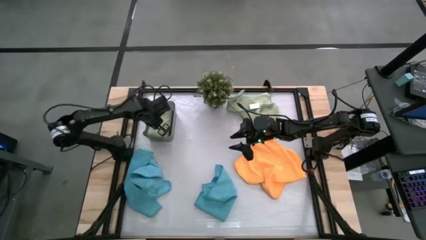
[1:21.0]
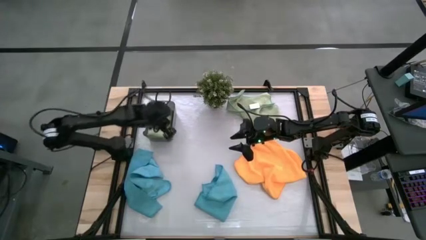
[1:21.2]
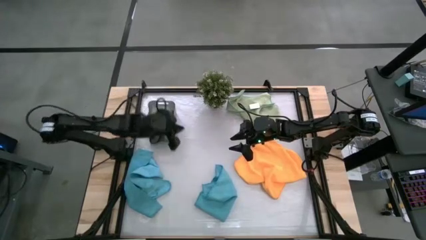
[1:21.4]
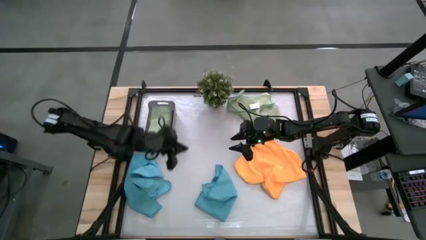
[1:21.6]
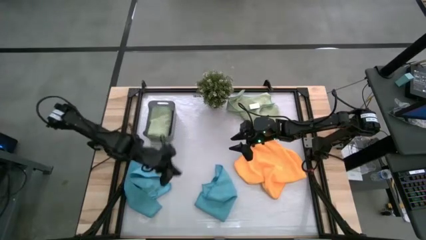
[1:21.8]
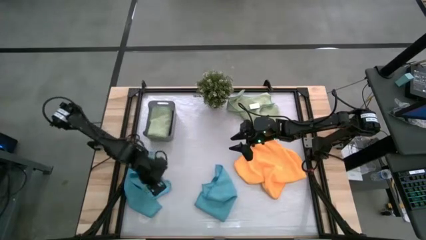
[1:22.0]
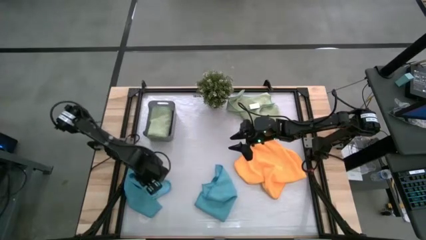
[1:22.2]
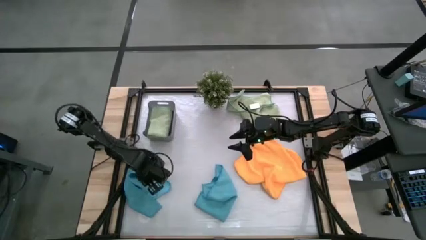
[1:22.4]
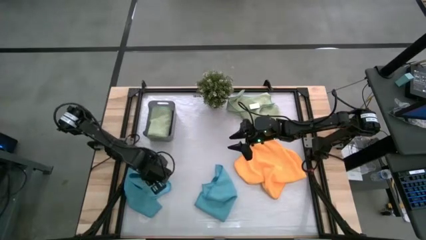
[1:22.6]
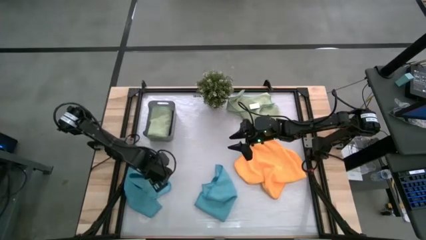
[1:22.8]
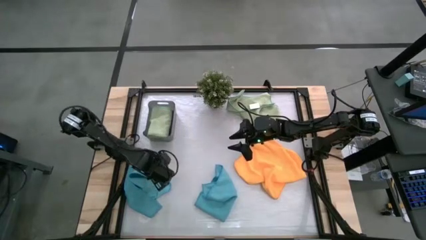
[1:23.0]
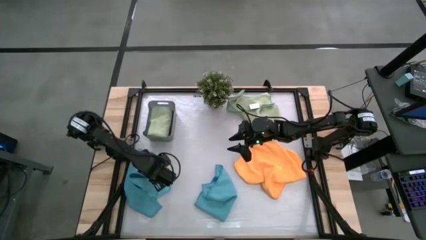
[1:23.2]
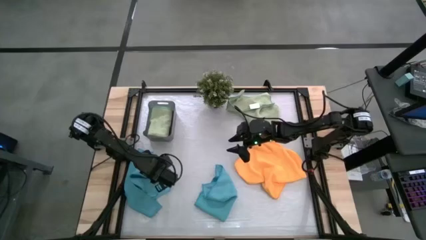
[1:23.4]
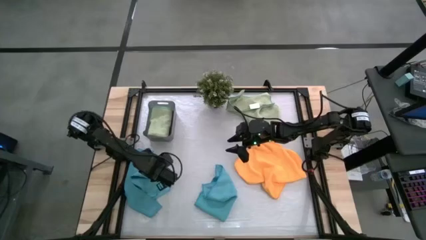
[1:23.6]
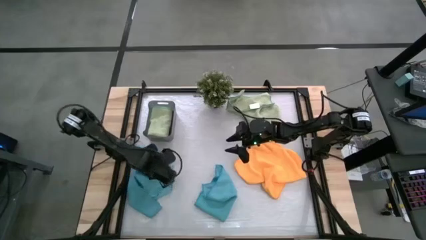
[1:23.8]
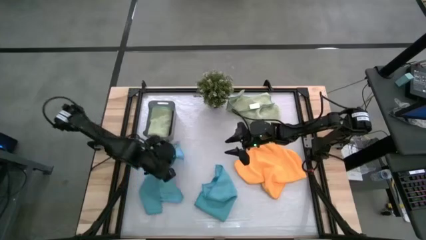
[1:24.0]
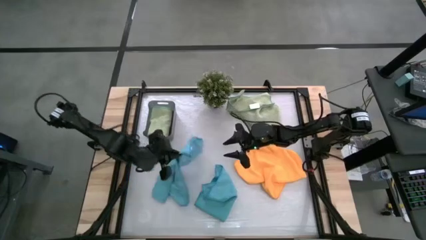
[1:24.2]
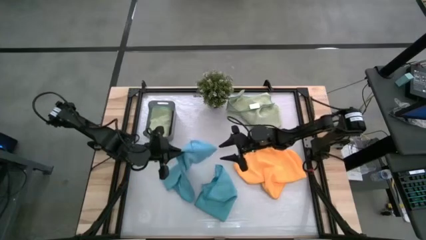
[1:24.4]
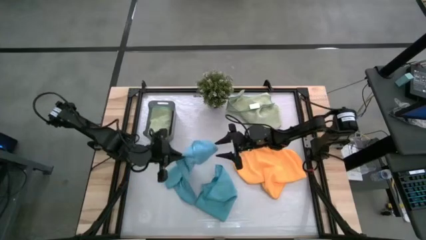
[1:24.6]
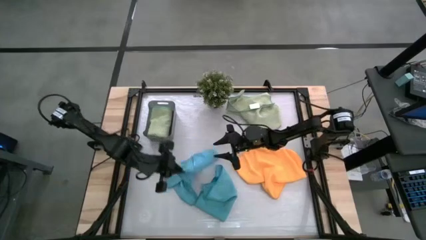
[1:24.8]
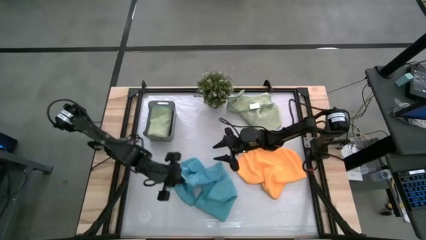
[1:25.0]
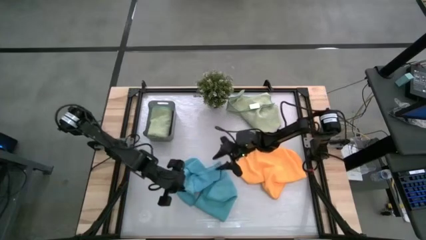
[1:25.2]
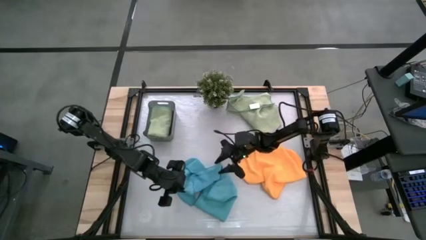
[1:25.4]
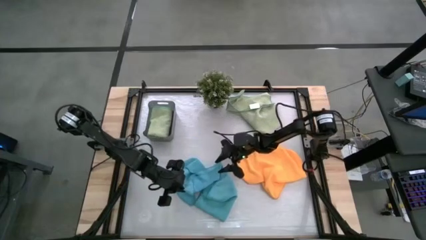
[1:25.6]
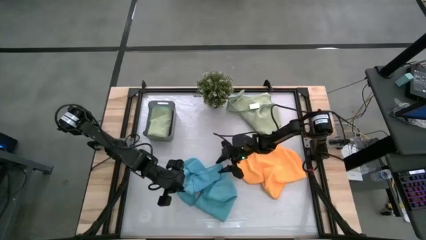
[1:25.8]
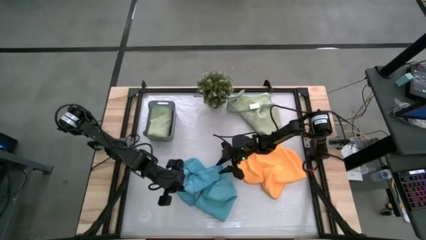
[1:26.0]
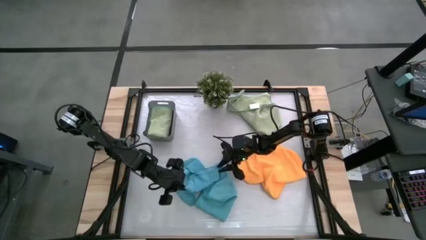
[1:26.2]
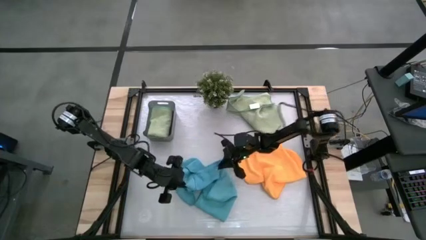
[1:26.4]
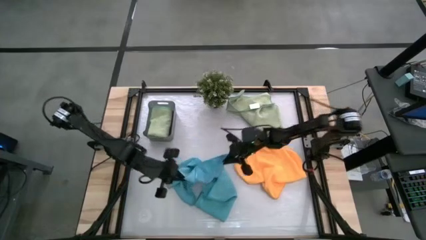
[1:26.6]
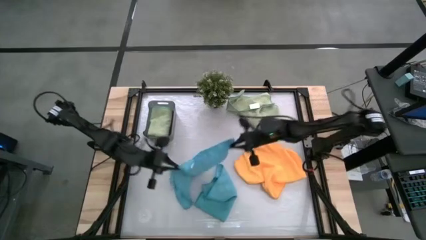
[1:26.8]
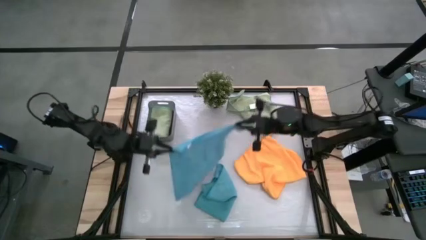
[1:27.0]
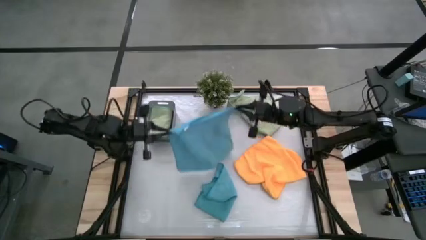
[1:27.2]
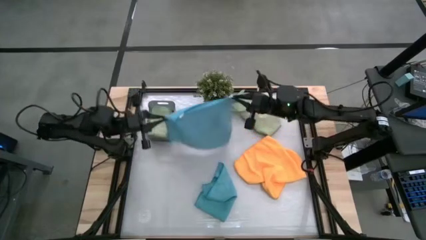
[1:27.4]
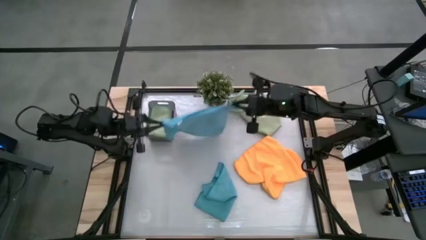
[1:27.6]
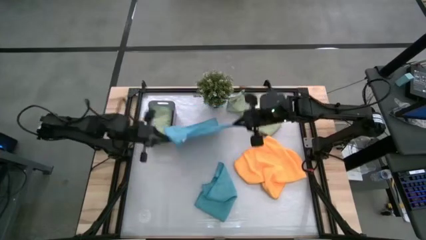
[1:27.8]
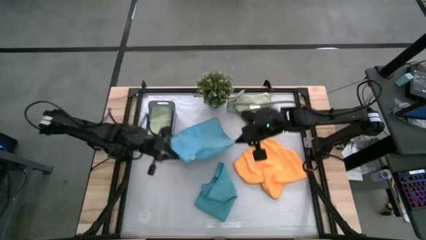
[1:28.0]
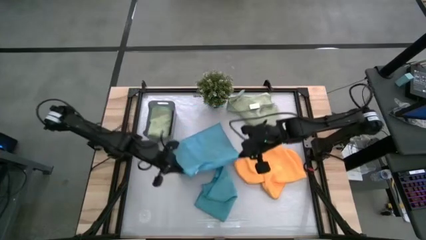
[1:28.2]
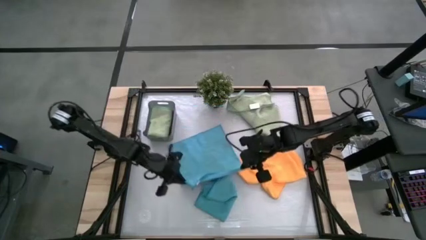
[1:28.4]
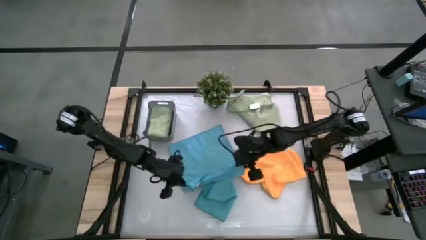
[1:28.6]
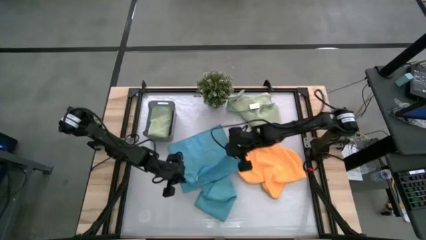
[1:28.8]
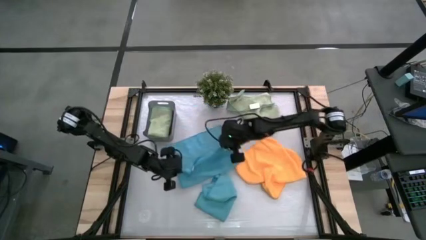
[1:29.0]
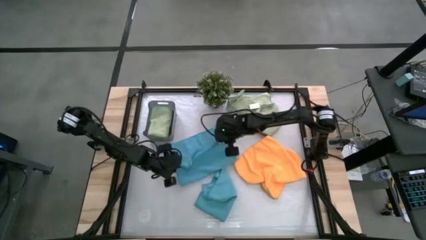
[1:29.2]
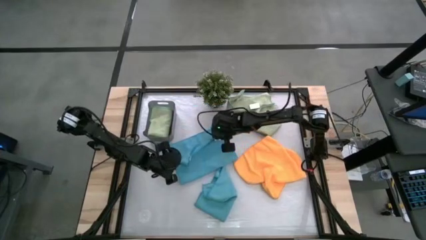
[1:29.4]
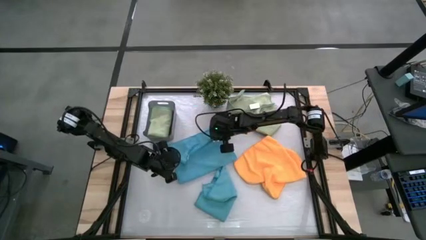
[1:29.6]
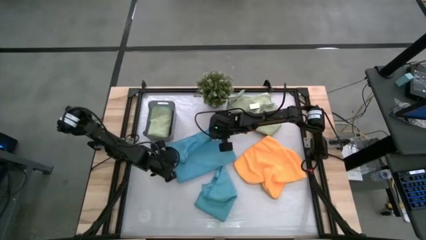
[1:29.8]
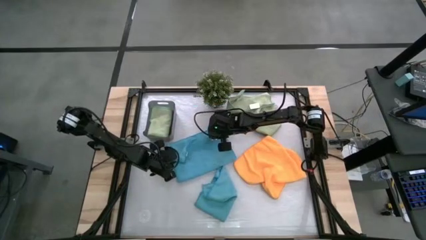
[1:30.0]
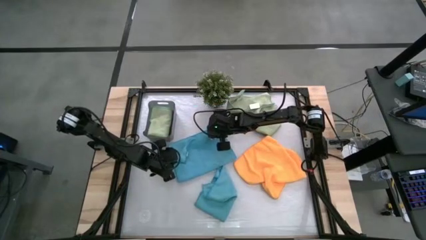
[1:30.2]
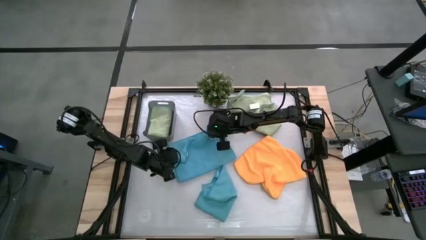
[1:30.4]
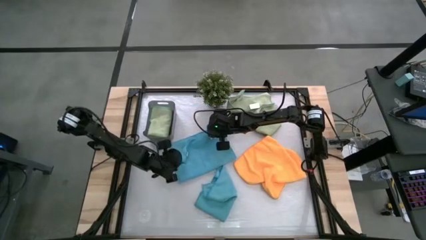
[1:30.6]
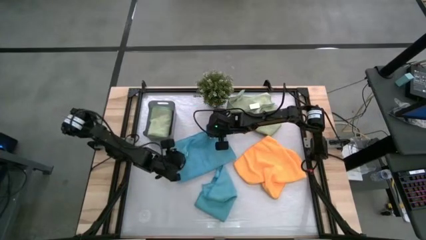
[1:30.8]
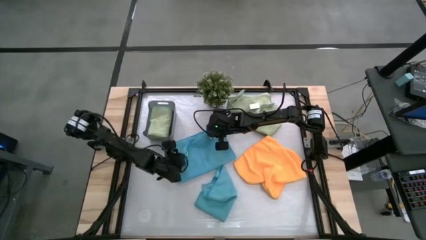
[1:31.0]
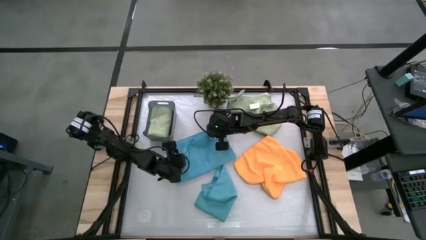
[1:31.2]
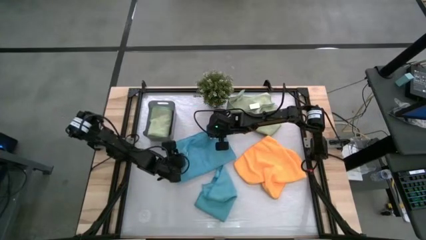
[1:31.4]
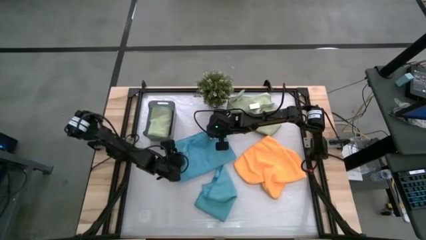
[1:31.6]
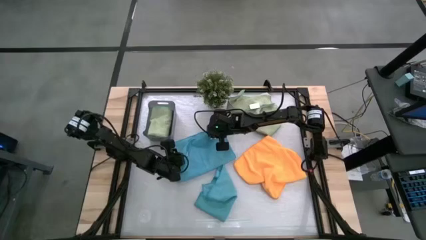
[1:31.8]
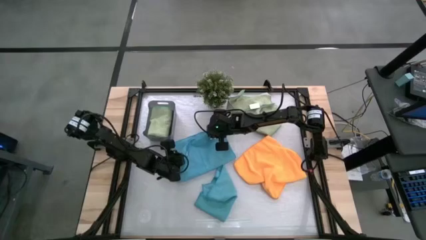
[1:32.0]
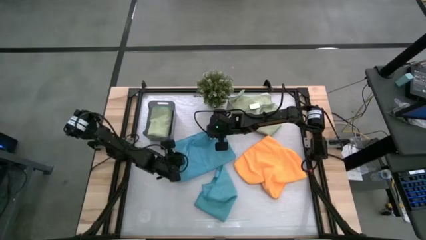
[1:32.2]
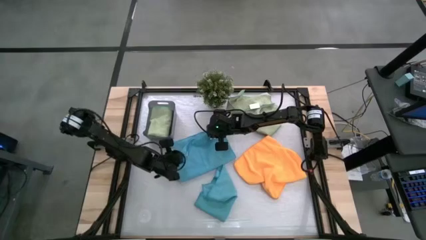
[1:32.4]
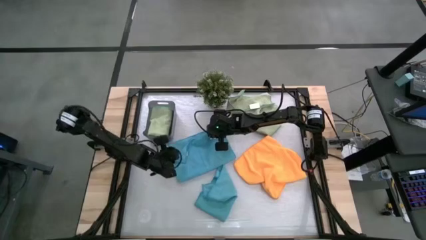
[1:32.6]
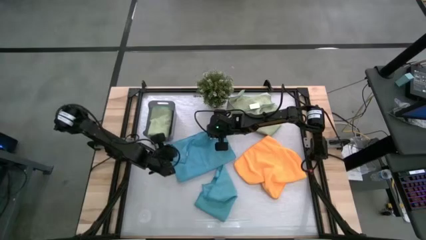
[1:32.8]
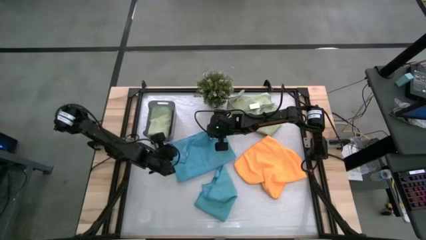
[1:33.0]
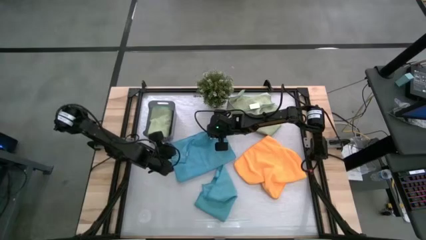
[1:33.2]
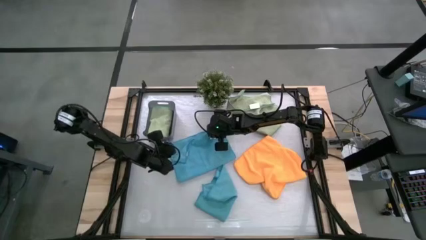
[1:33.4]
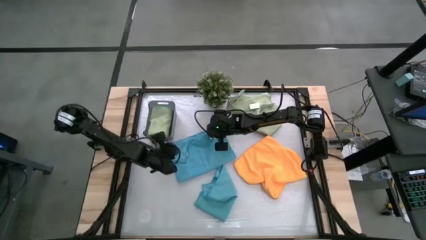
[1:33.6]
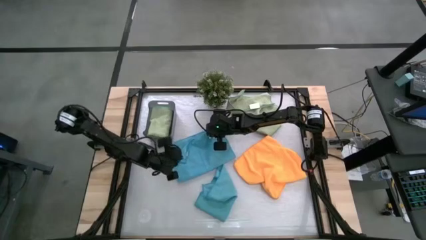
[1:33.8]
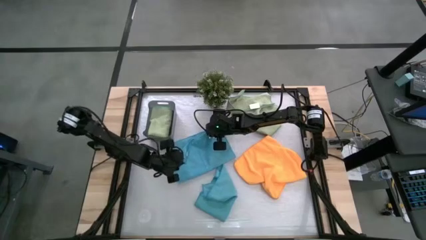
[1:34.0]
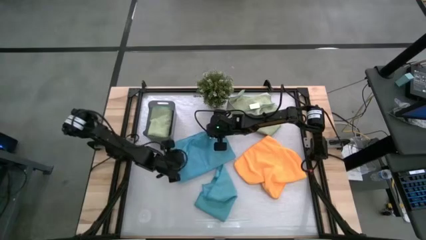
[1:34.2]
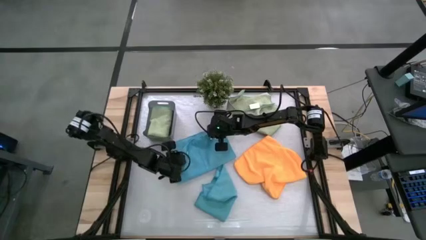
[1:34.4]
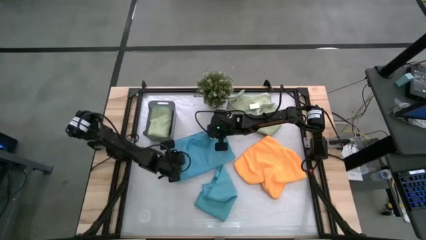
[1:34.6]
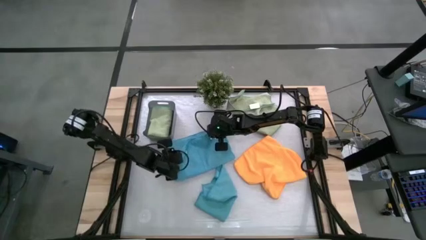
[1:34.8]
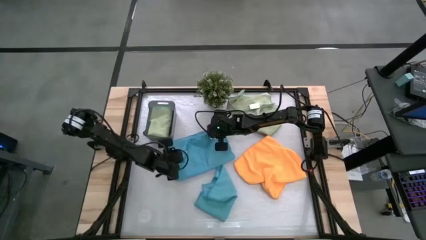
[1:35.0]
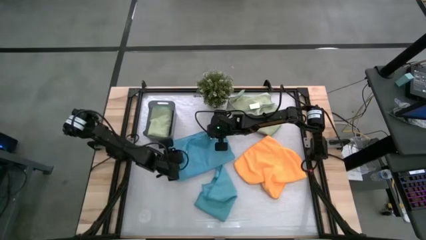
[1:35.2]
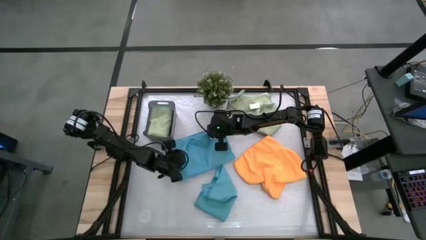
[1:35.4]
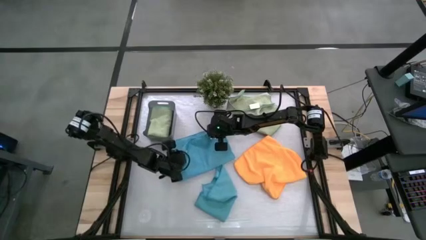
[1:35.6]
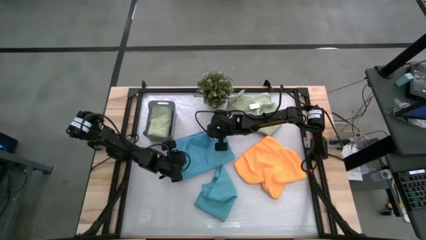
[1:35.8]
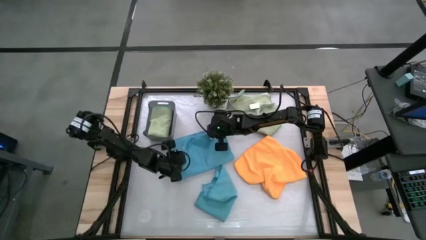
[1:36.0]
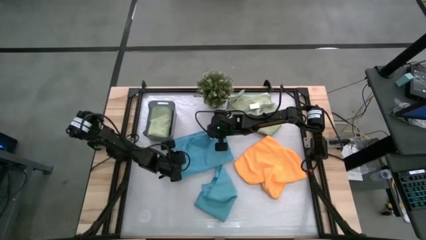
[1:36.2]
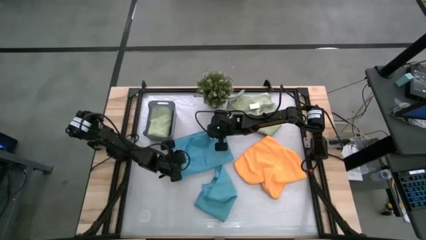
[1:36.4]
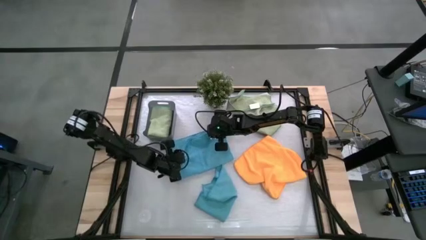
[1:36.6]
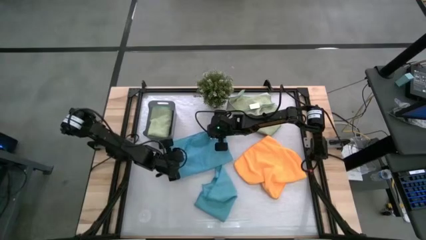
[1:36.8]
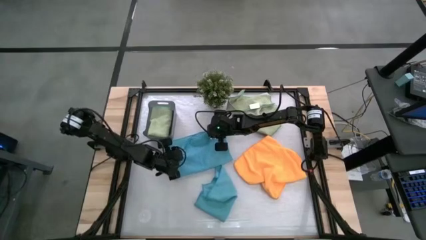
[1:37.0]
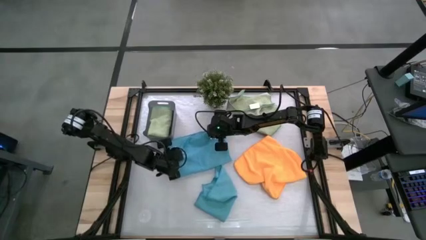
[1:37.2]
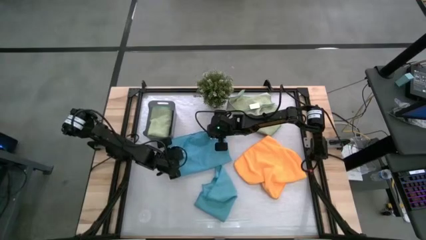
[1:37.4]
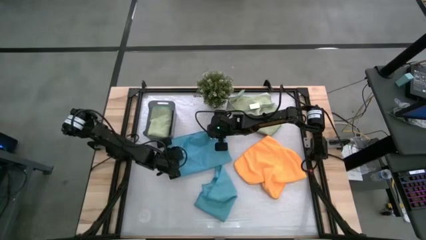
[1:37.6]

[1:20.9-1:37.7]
Task: Fold microfiber towels
Fold the left blue microfiber cloth
